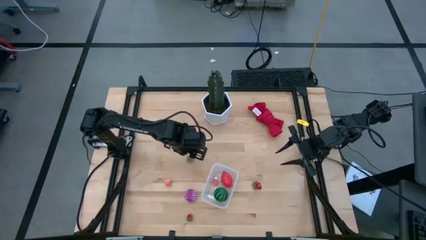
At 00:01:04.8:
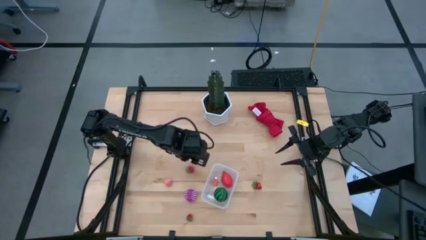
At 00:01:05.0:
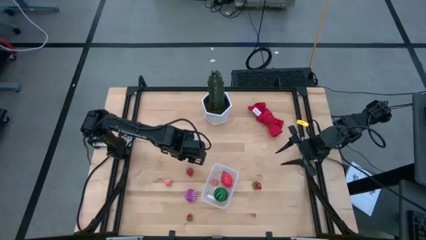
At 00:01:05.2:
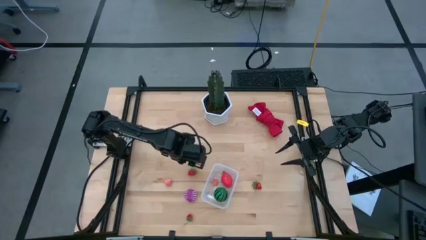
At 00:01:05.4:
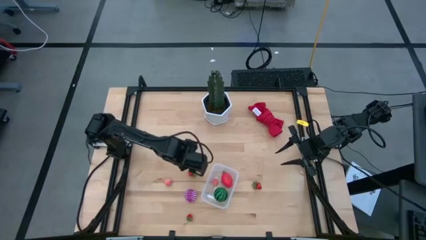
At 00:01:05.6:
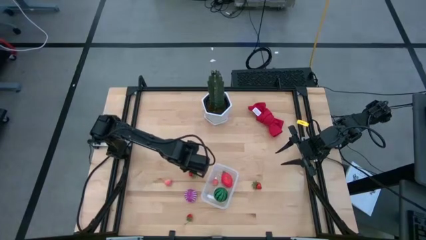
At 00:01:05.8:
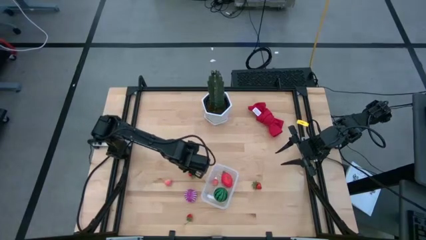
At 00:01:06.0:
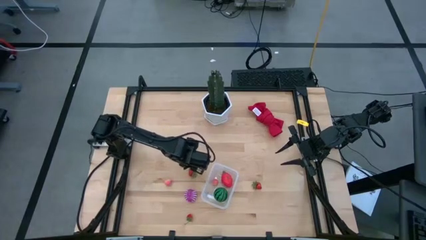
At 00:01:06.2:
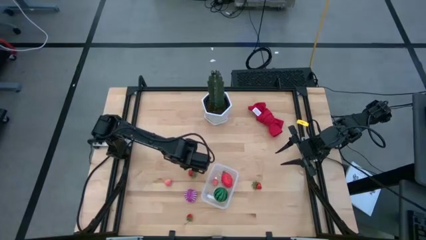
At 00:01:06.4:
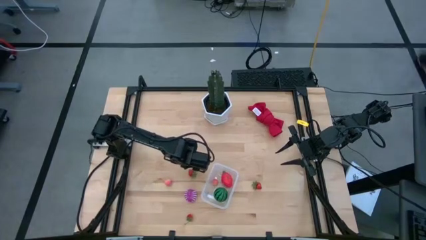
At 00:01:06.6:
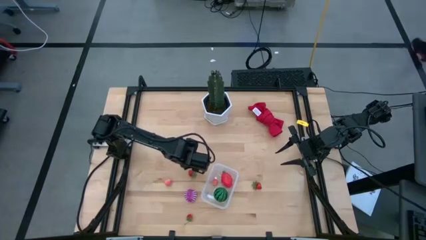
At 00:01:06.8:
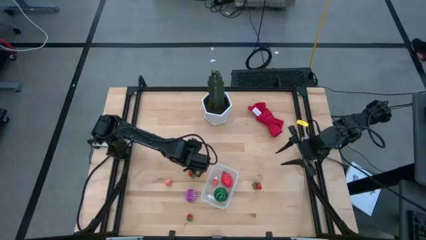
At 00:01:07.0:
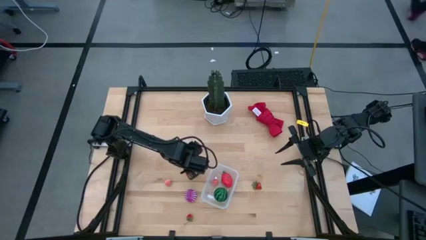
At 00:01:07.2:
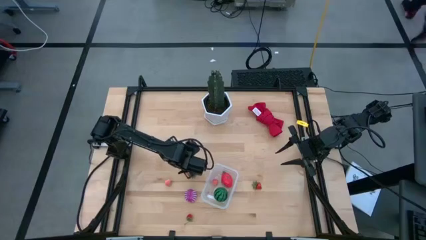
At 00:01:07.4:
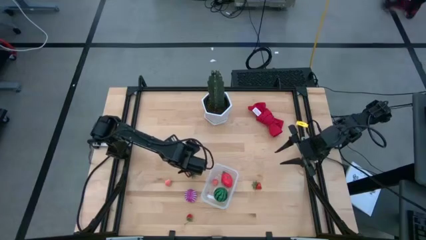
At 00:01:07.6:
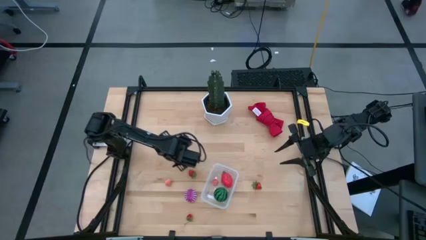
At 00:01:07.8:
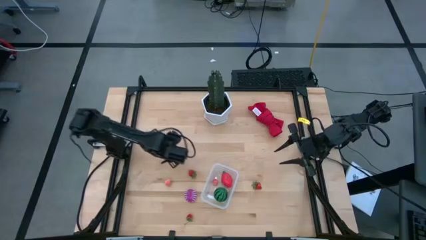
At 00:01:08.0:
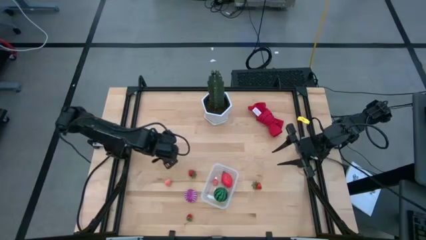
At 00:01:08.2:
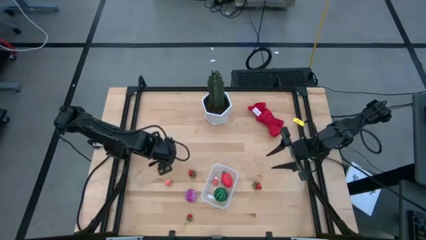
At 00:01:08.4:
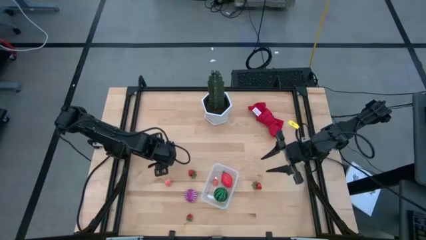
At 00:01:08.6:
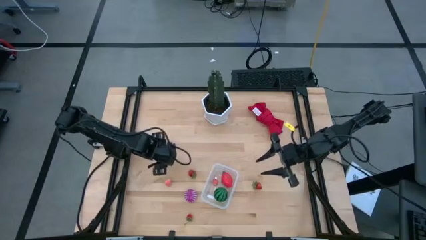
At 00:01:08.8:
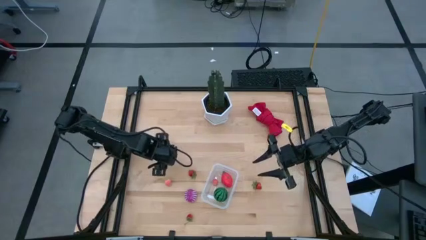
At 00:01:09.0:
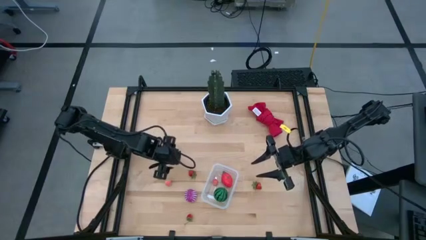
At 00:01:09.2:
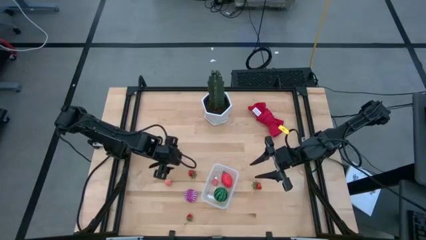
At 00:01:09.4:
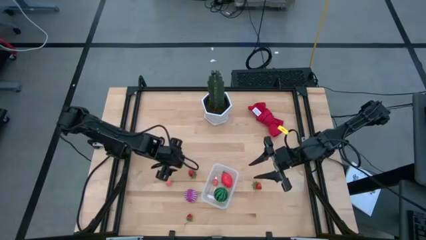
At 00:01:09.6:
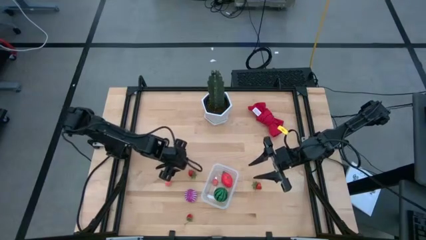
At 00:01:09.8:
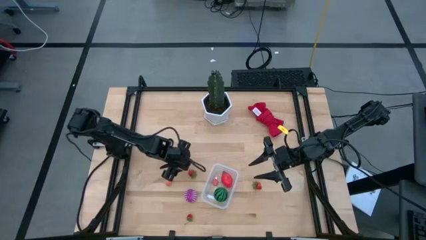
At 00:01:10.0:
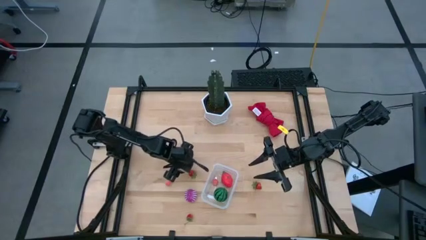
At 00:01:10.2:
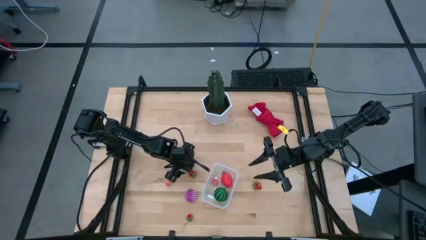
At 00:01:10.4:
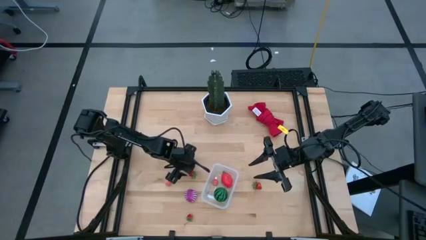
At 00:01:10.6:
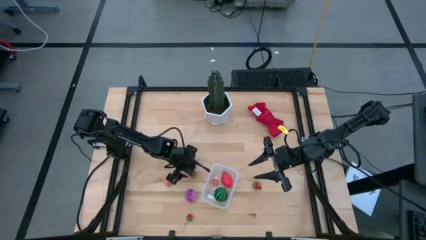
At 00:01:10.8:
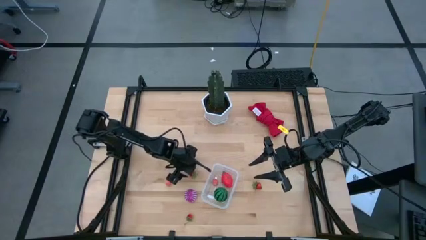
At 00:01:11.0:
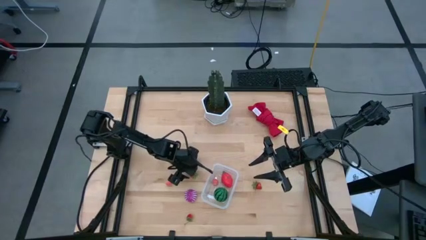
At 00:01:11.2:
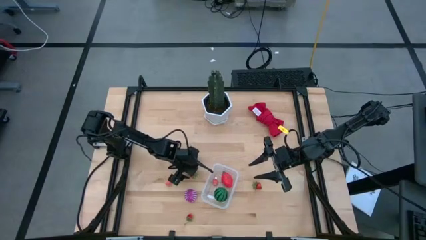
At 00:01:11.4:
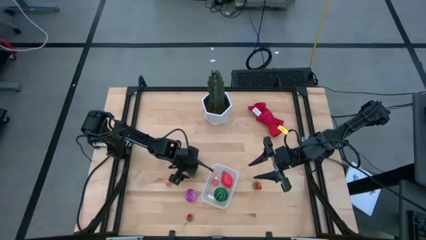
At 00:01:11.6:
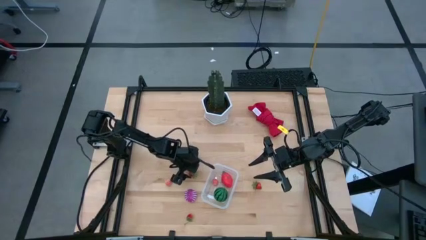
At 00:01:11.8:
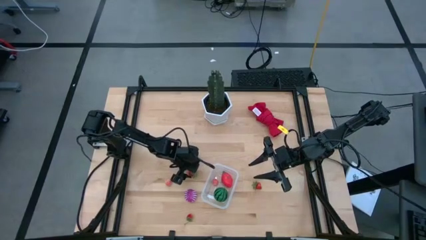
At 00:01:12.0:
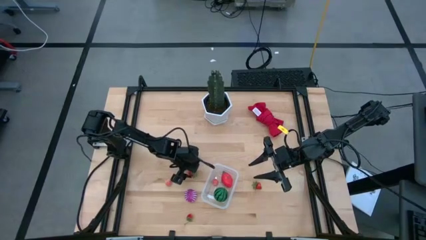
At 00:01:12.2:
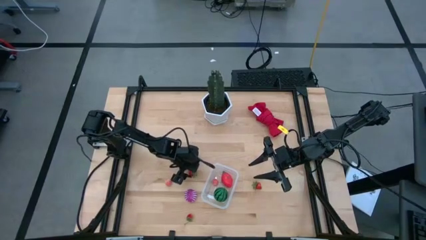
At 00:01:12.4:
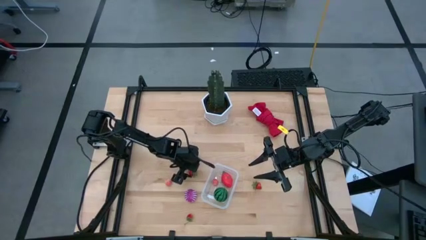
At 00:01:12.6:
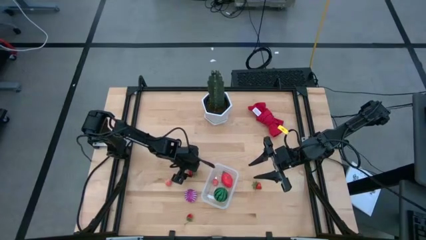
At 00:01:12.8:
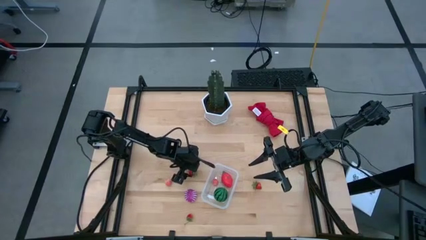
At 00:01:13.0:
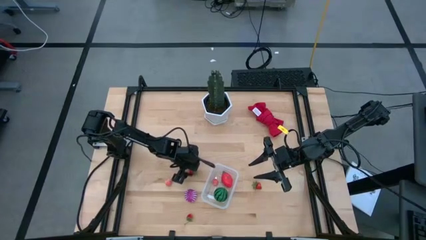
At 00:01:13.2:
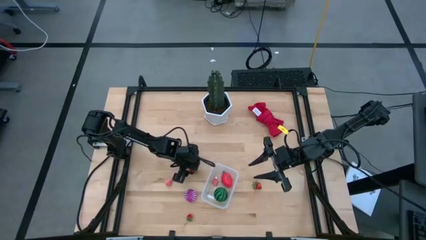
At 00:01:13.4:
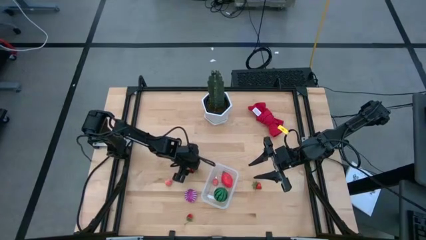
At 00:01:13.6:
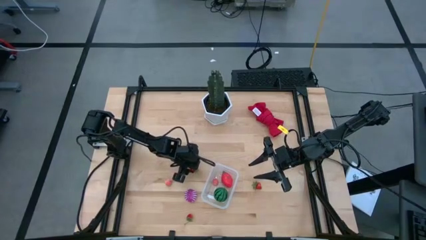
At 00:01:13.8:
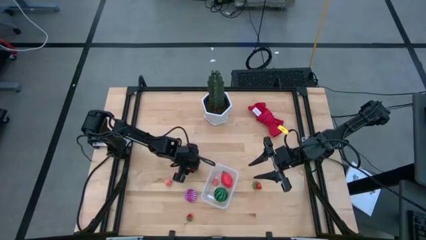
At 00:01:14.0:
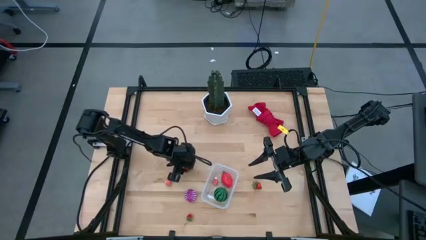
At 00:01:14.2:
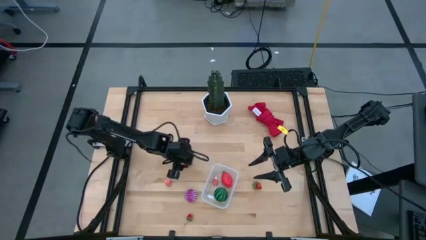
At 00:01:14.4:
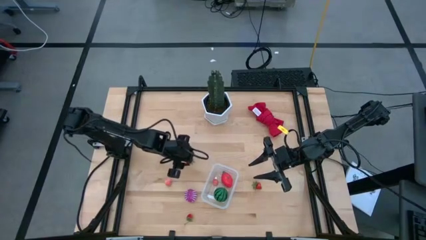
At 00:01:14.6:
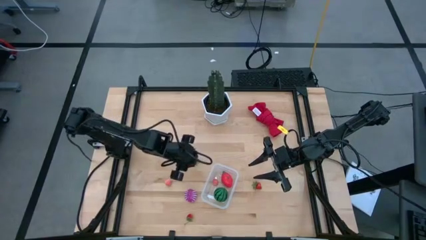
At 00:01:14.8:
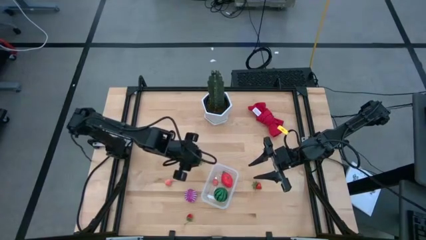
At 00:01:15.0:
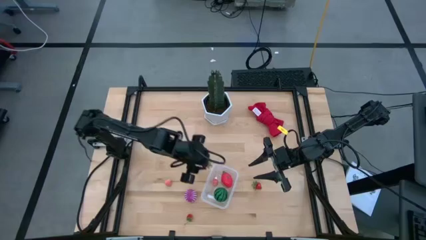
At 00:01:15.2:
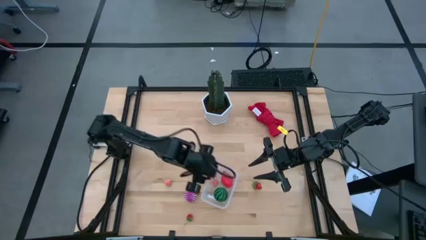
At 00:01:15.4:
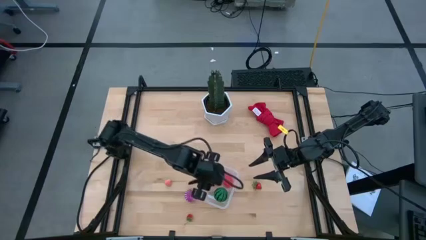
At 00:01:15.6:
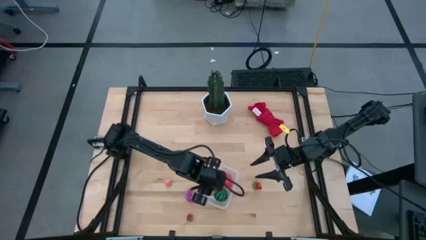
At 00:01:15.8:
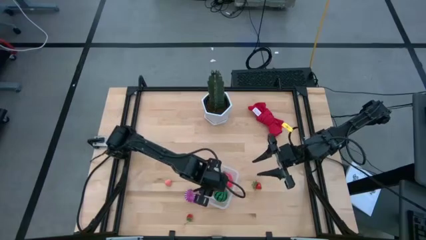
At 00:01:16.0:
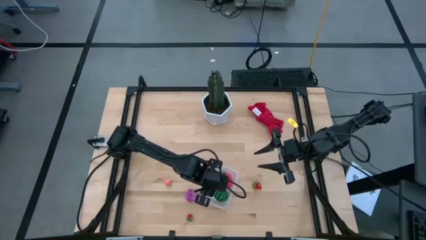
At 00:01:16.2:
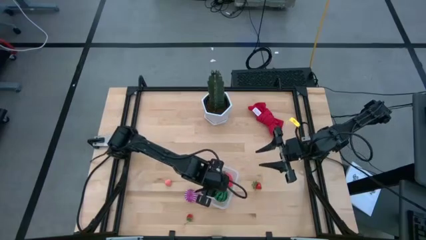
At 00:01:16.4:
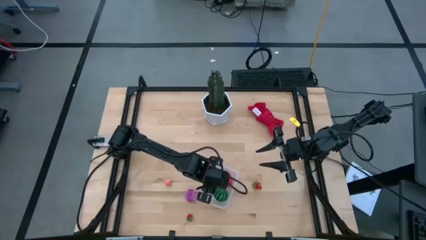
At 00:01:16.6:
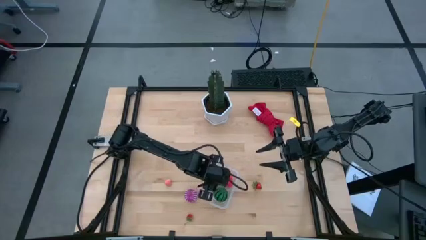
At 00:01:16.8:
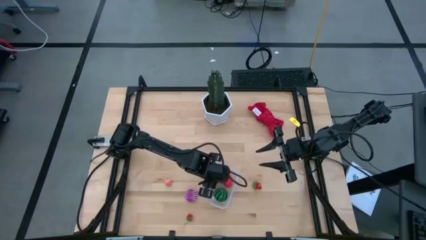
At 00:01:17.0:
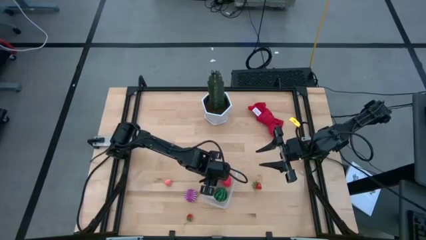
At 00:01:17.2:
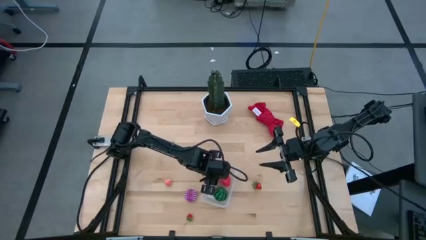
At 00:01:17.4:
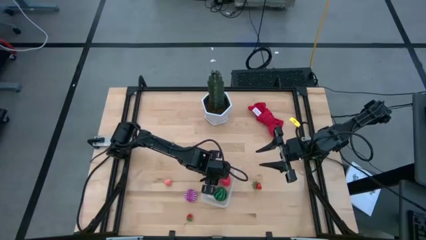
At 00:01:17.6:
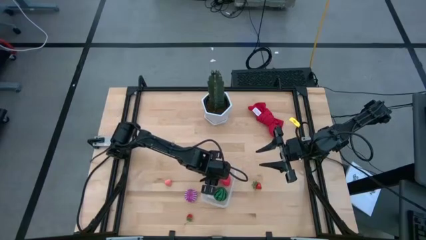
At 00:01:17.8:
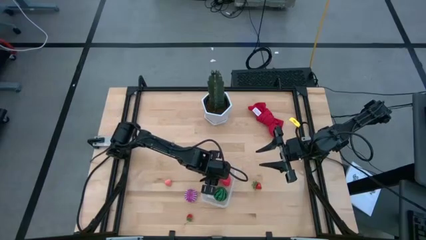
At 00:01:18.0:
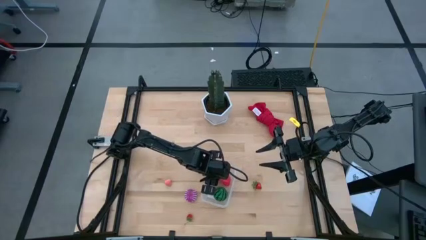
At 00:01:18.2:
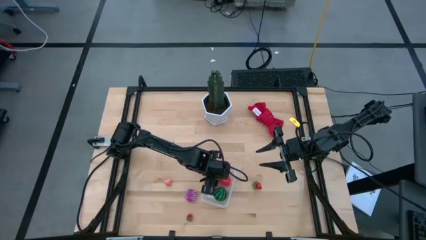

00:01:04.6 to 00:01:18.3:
Task: Pick and placing Produce into tupperware
Put the top red strawberry into the transparent bin

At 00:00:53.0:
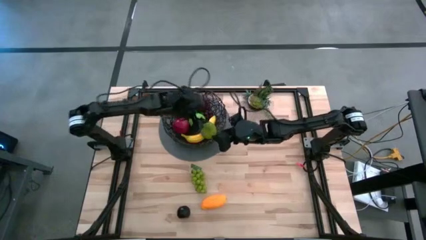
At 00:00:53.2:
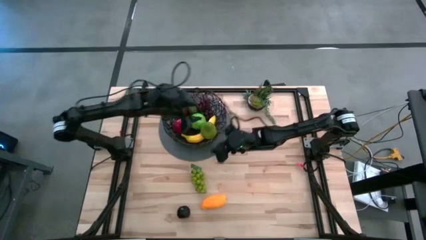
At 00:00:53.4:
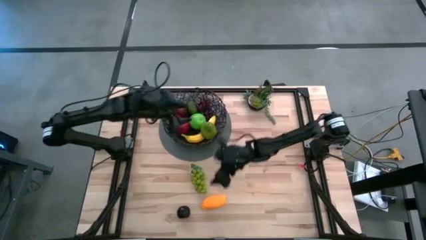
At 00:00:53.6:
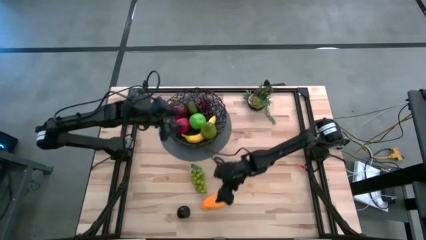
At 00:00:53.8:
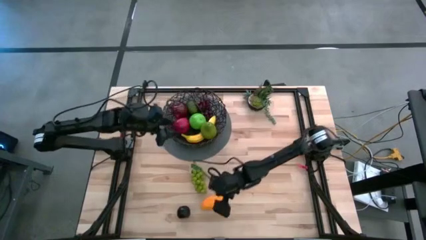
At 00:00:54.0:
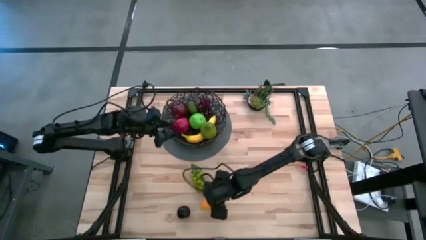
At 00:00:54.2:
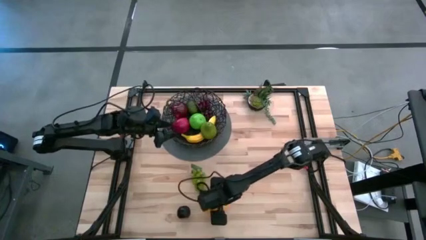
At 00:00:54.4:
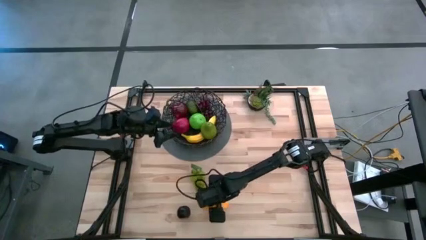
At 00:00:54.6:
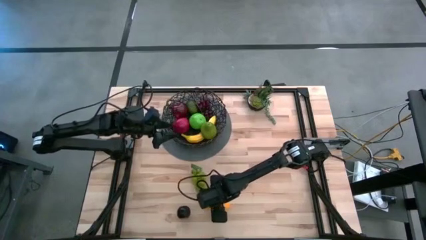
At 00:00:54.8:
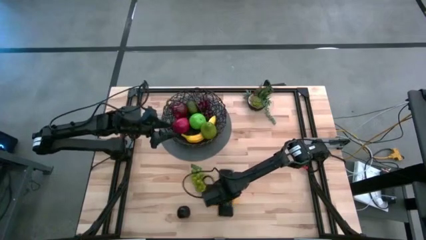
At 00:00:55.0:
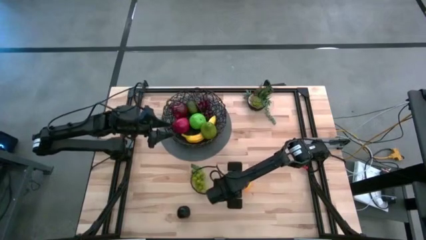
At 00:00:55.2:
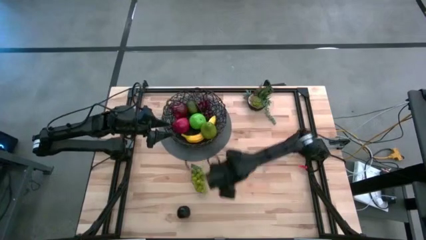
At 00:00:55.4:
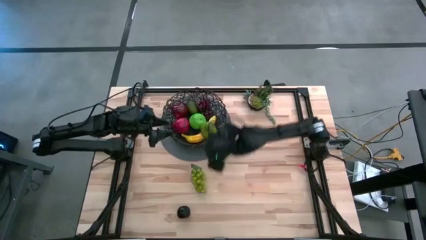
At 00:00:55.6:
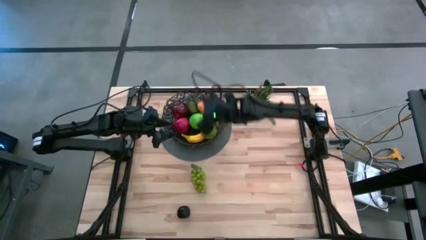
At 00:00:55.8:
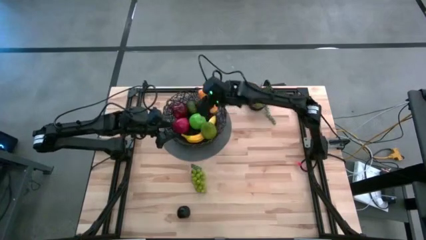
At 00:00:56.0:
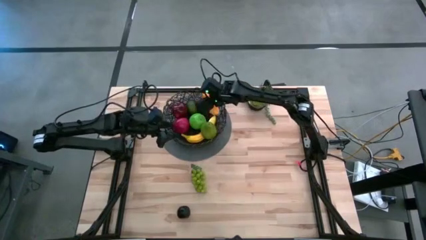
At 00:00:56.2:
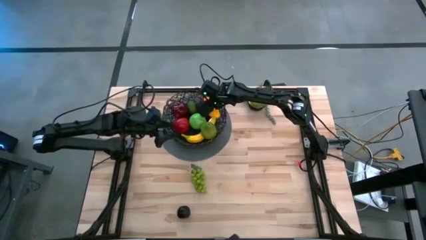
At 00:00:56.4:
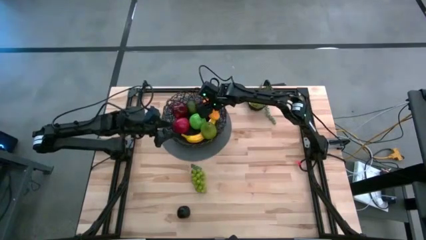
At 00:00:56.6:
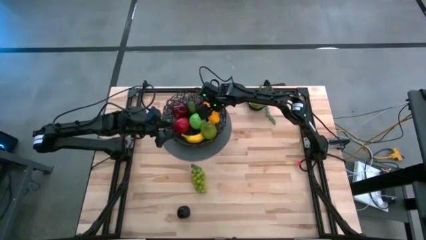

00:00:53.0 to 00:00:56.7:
Task: Build produce basket
Put the yellow mango into the black wire basket
